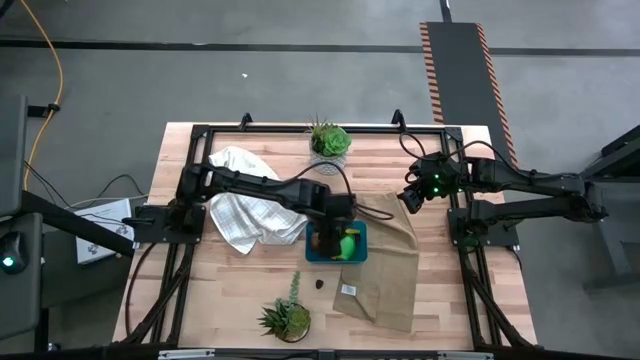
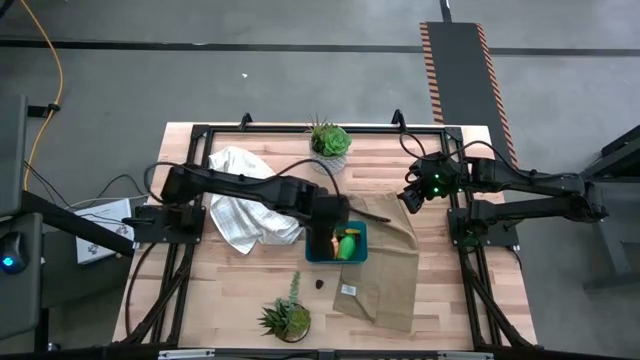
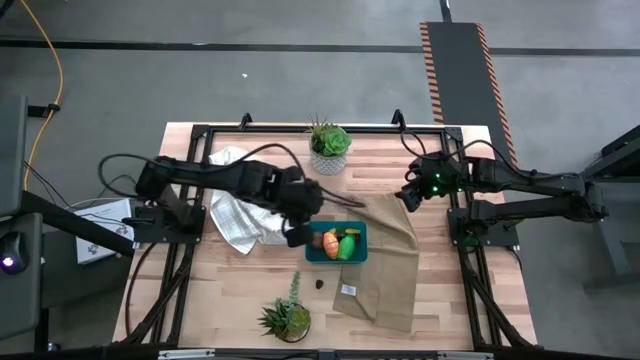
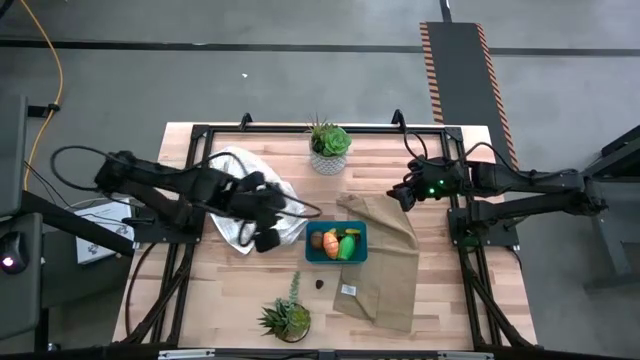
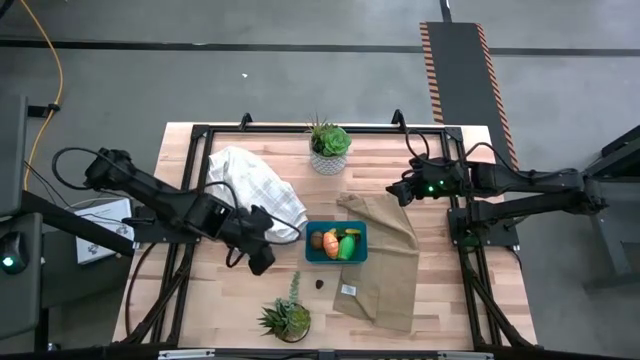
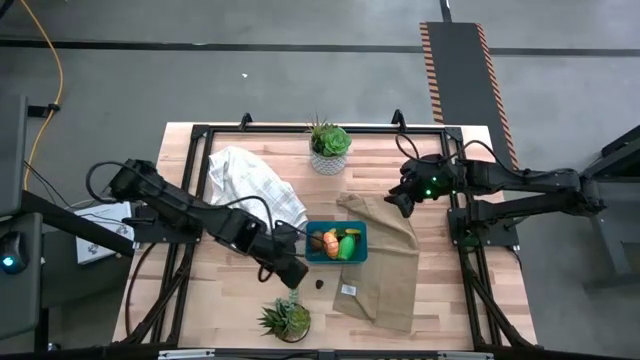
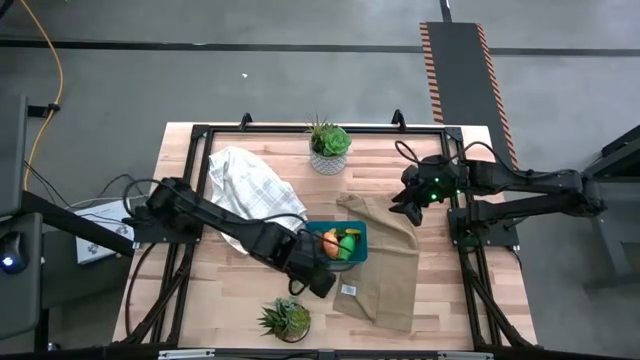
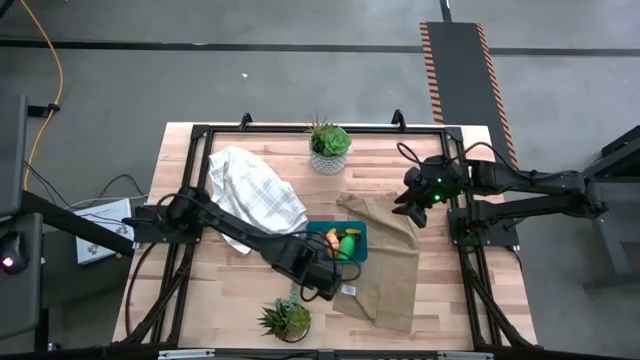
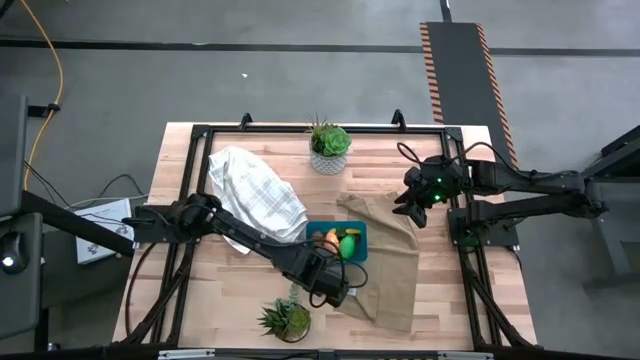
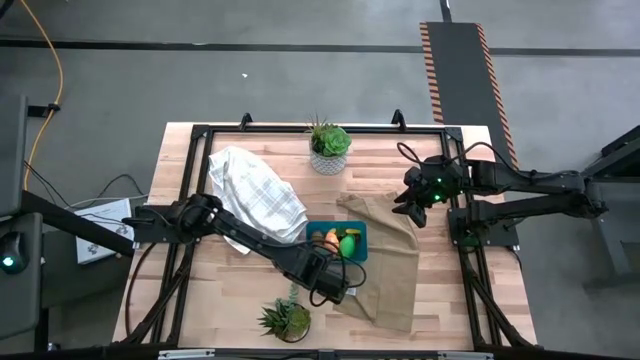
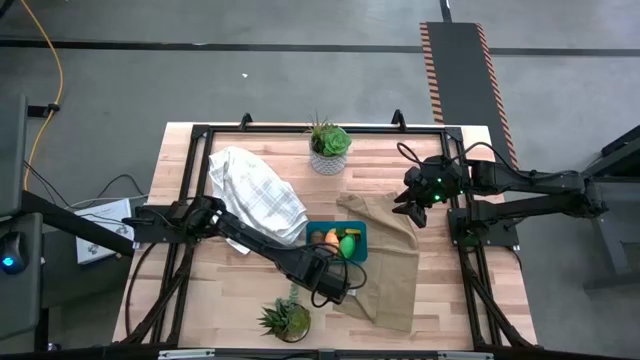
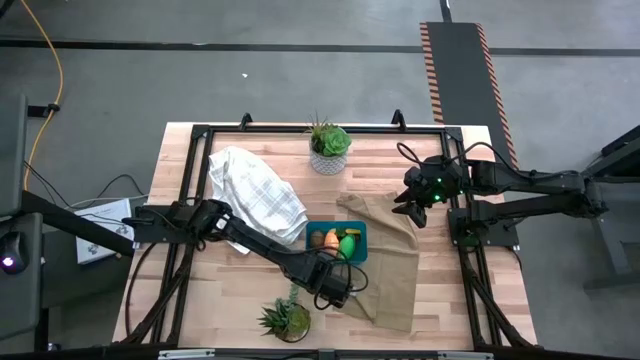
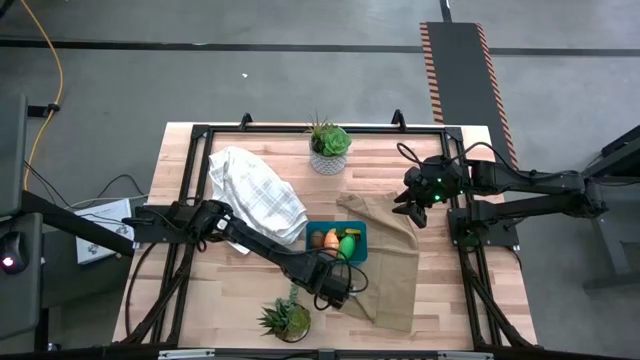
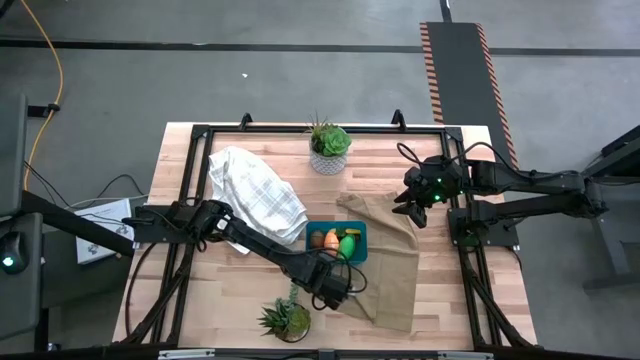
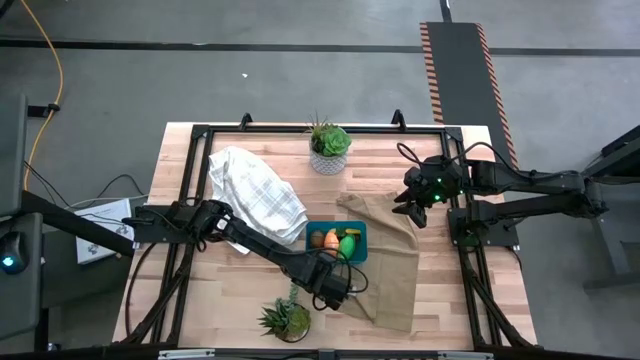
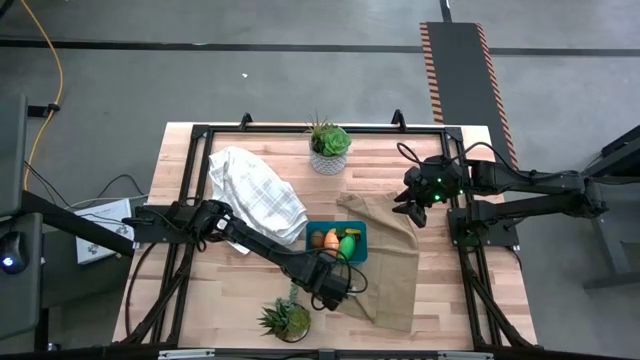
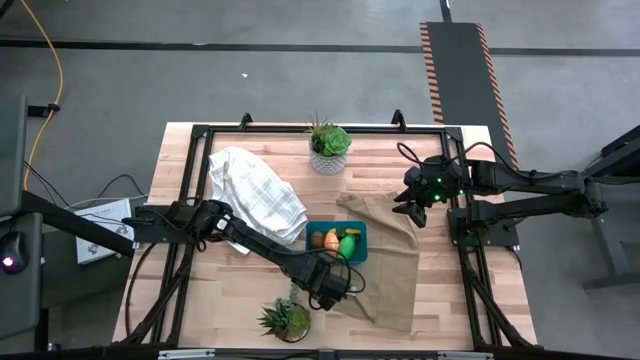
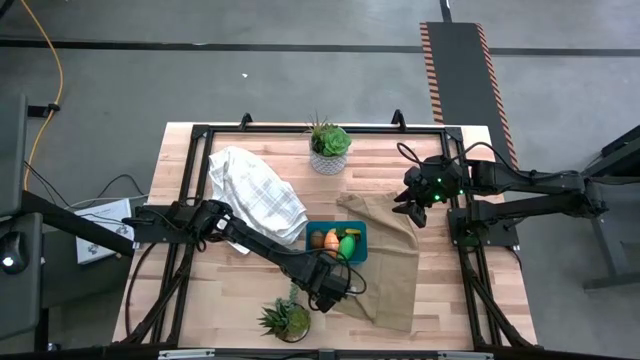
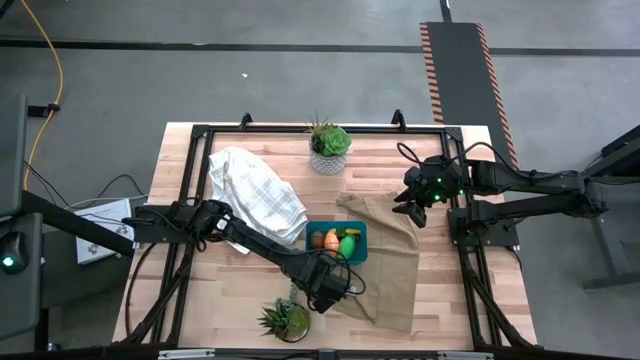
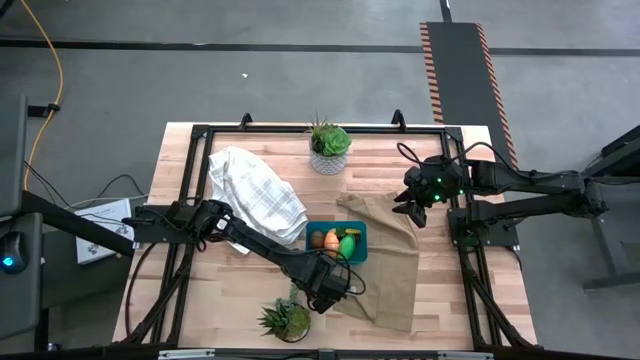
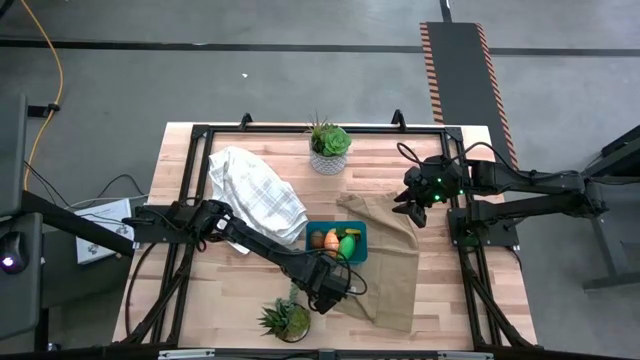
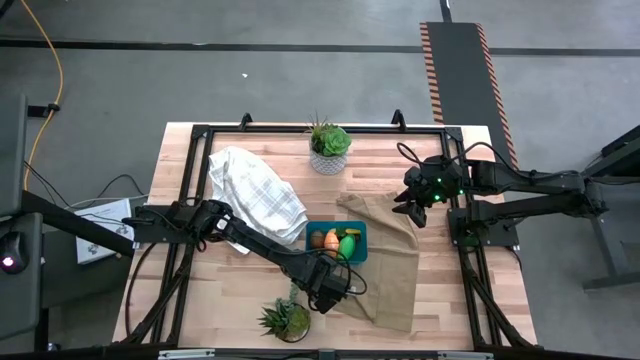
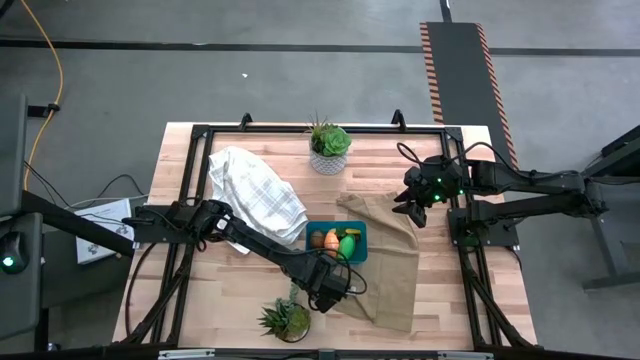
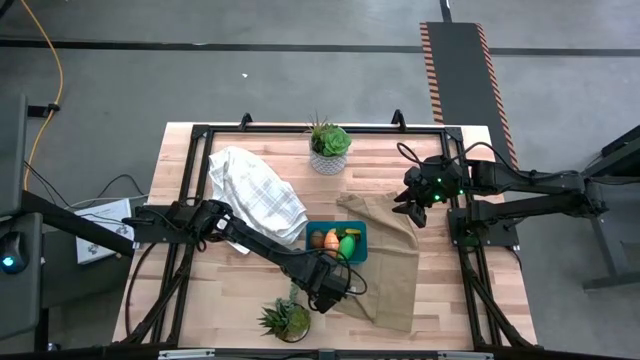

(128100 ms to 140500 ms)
Task: Pick and placing Produce into tupperware
Put the blackberry into the blue bin

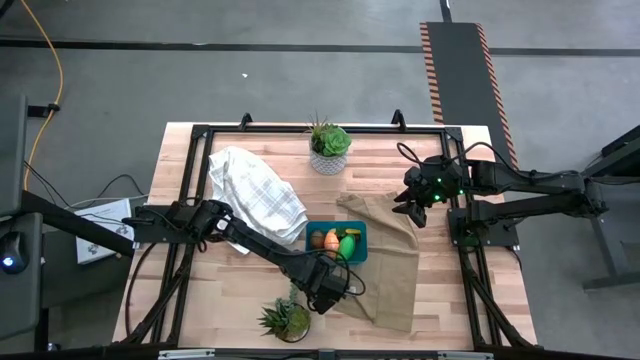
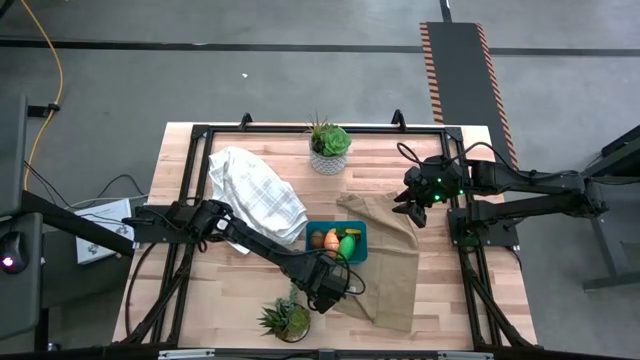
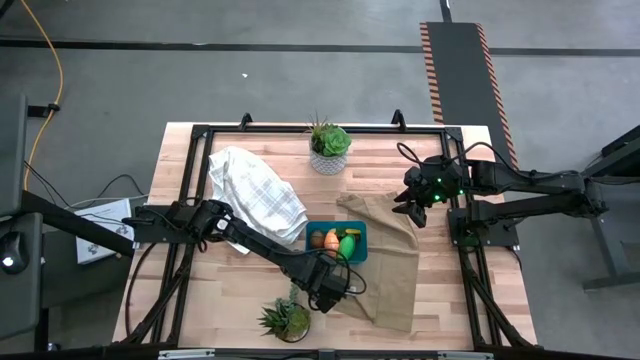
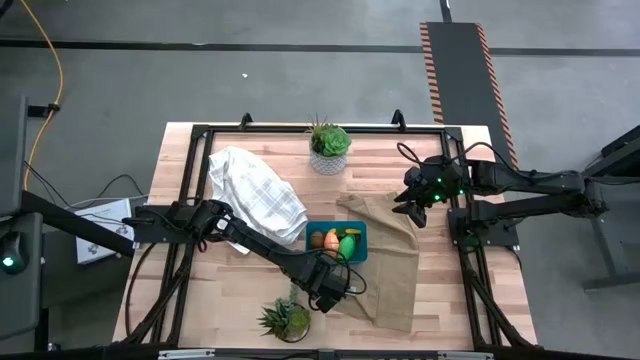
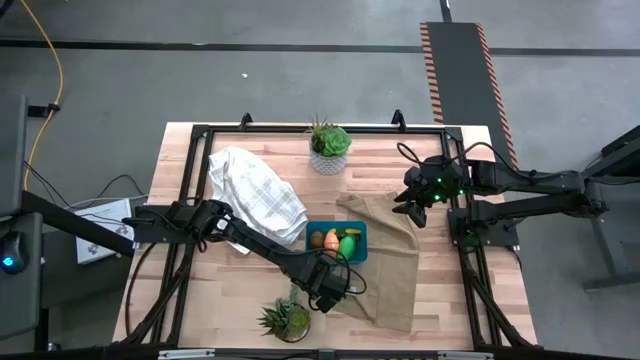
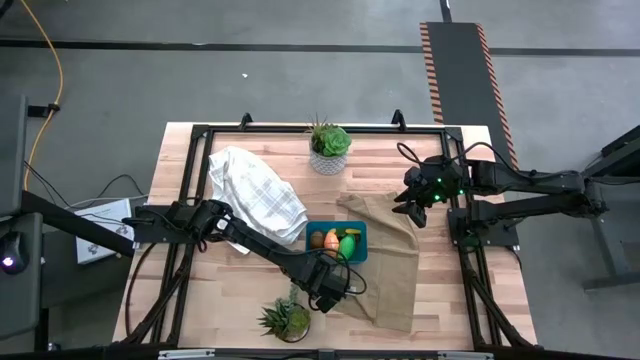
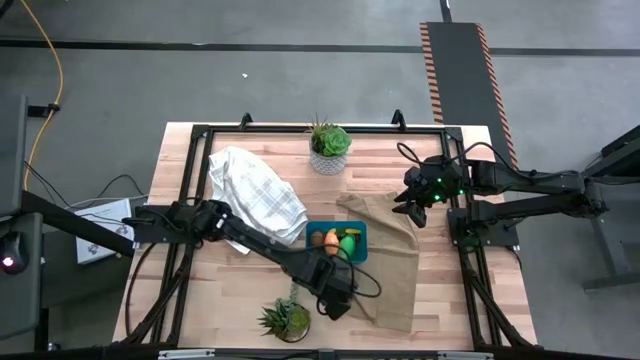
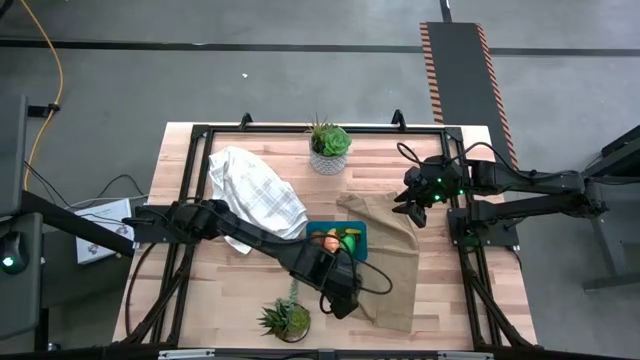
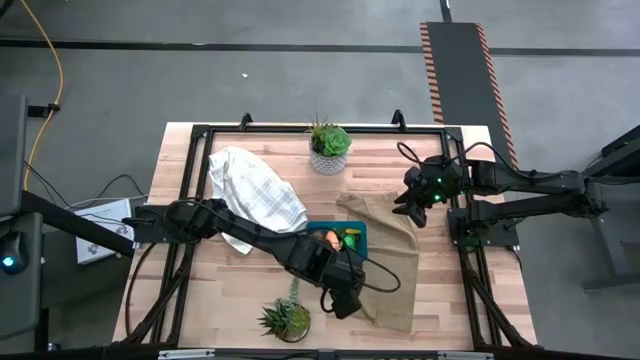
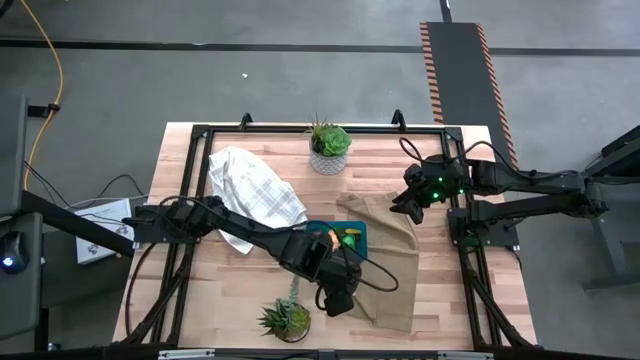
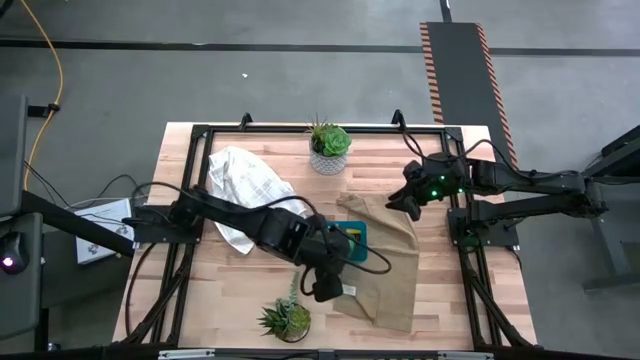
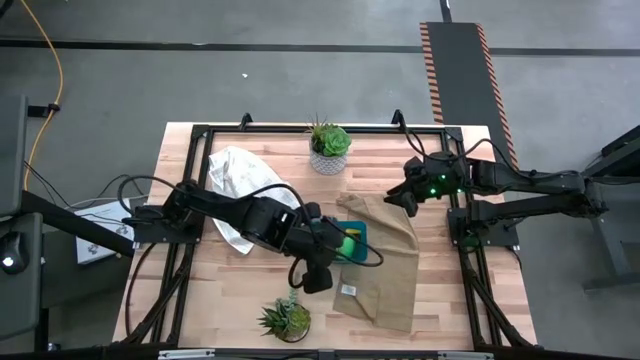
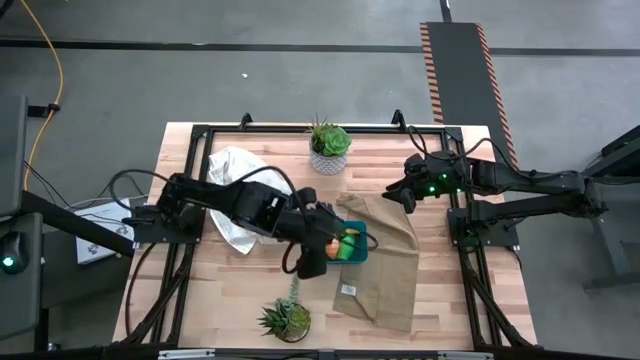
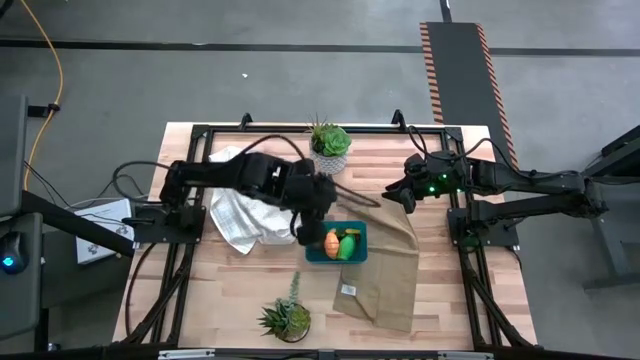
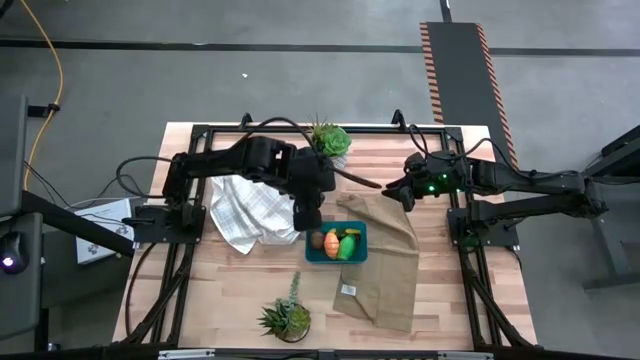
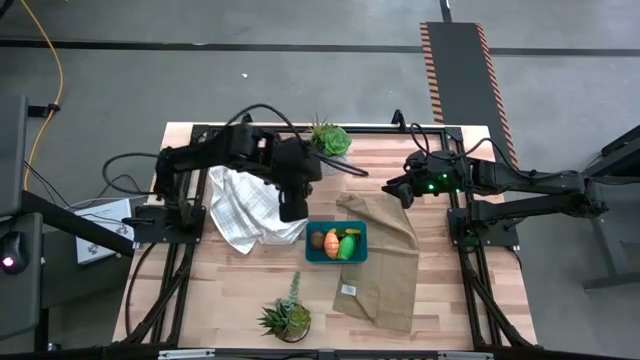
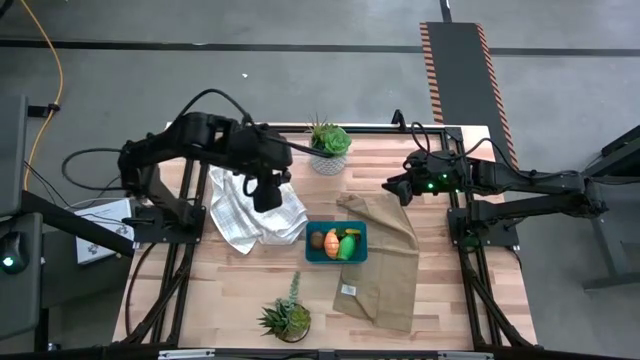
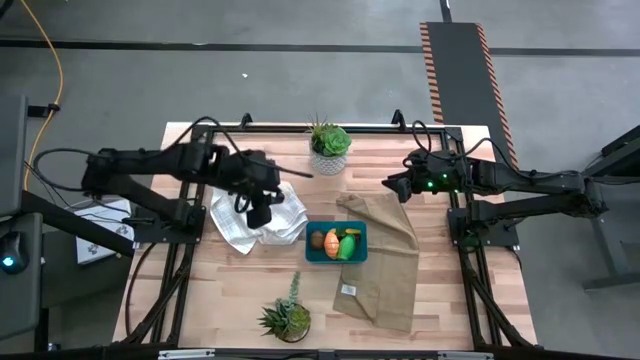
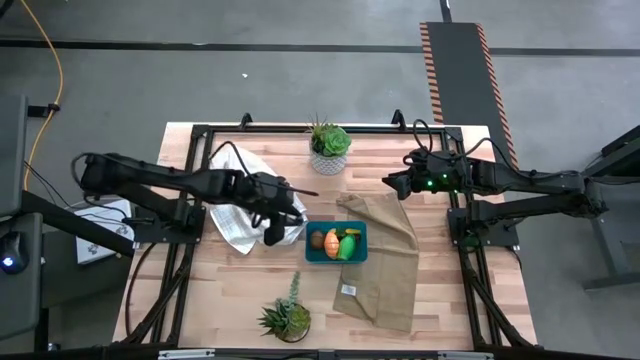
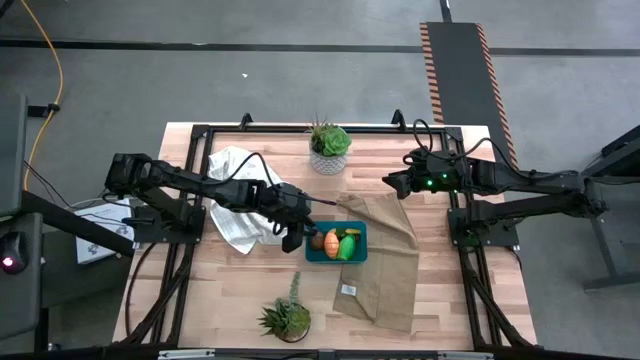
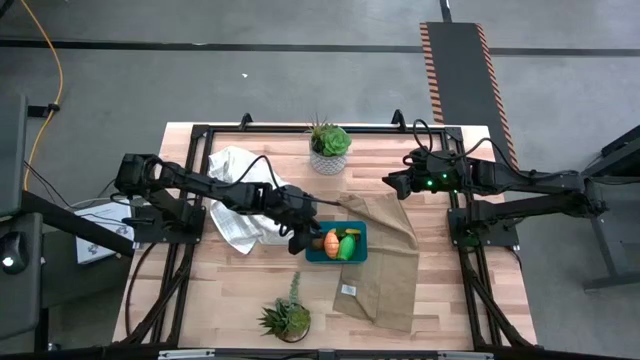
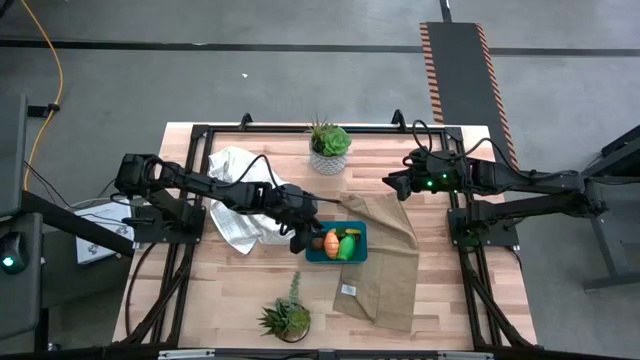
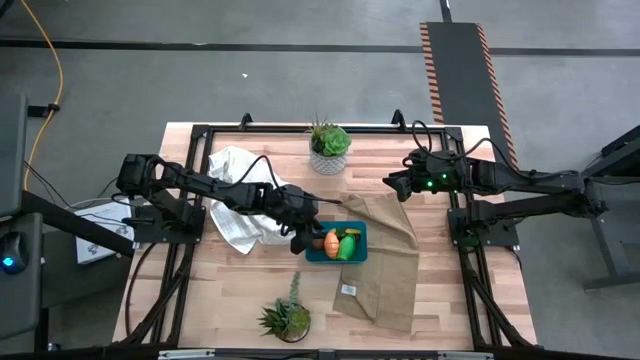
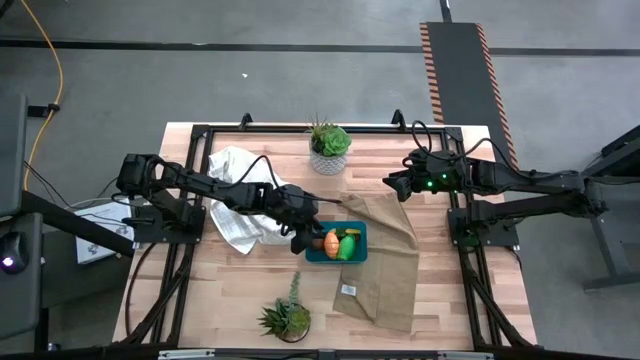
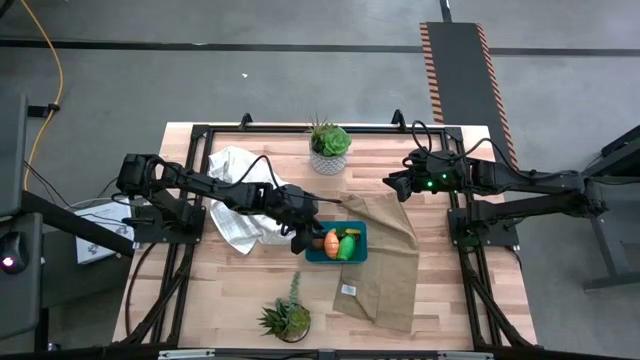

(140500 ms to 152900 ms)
Put the blackberry into the blue bin
